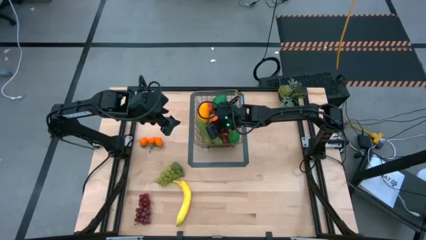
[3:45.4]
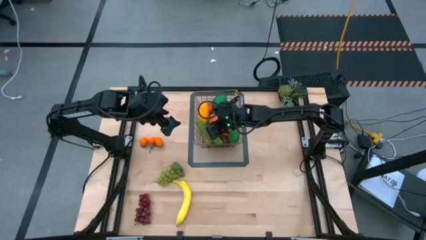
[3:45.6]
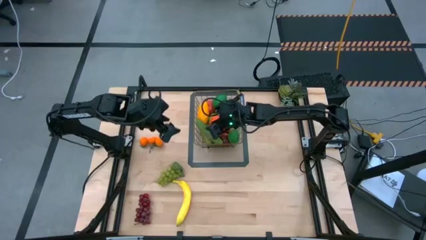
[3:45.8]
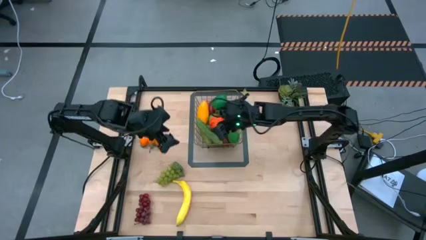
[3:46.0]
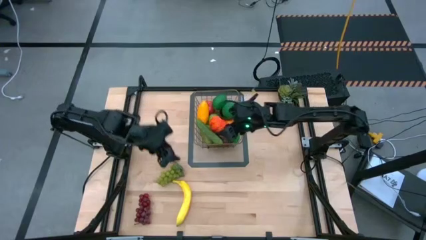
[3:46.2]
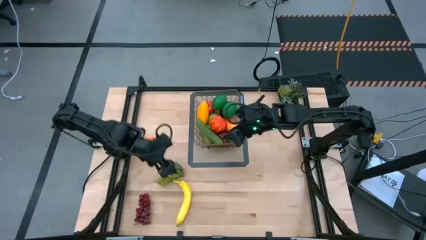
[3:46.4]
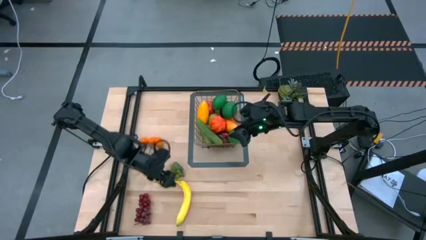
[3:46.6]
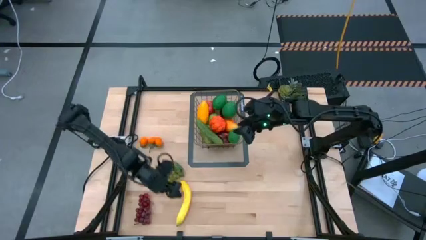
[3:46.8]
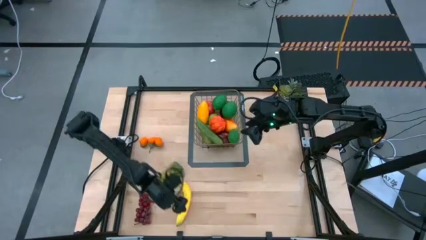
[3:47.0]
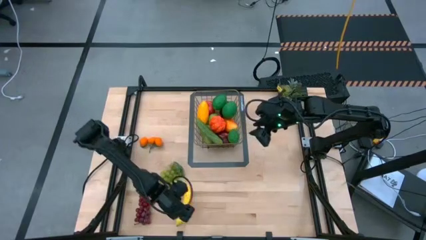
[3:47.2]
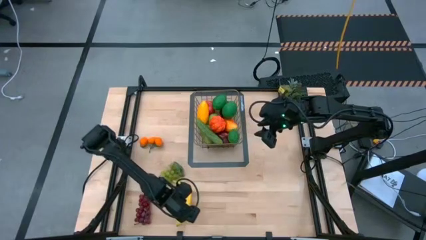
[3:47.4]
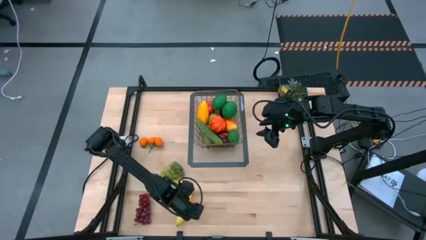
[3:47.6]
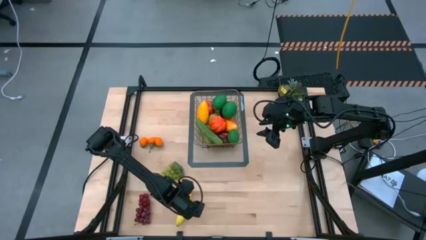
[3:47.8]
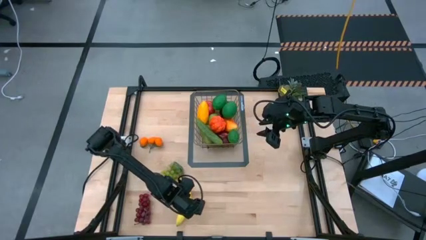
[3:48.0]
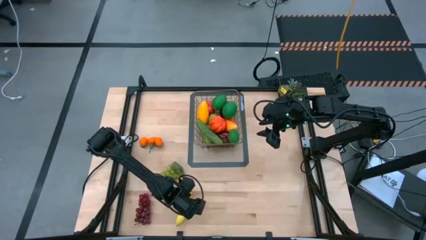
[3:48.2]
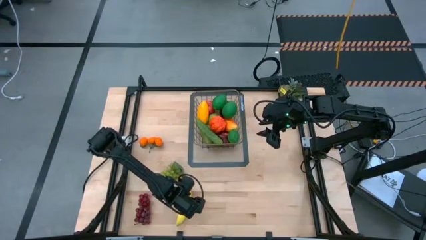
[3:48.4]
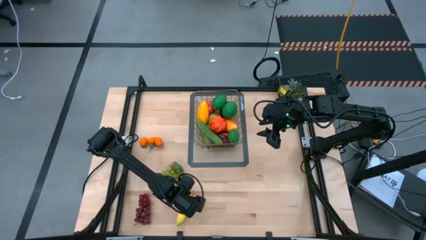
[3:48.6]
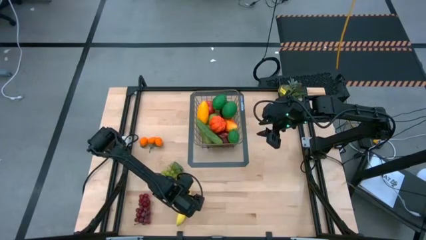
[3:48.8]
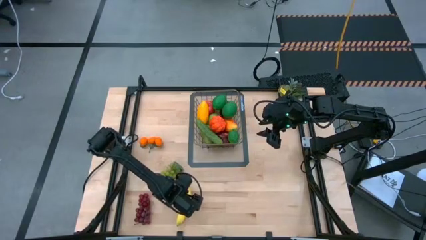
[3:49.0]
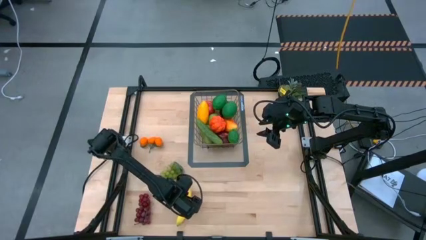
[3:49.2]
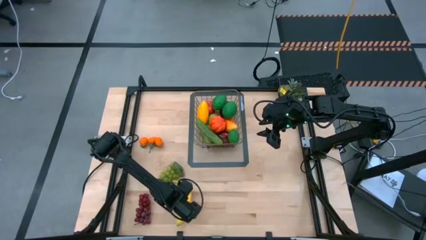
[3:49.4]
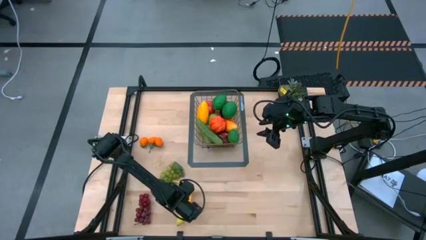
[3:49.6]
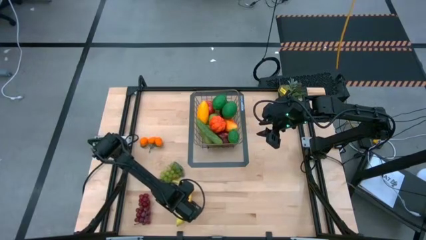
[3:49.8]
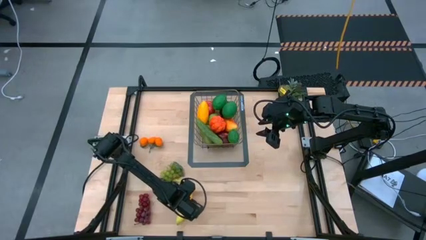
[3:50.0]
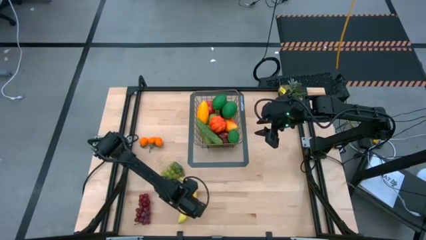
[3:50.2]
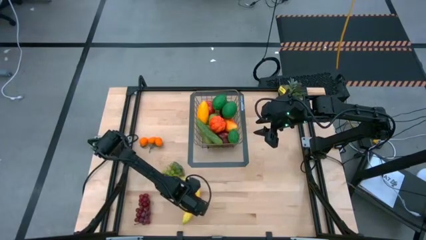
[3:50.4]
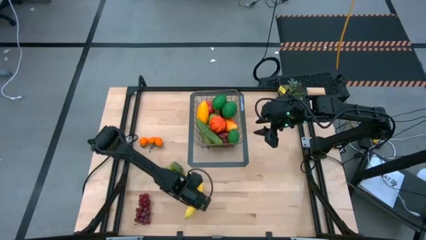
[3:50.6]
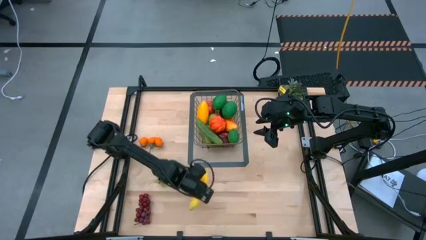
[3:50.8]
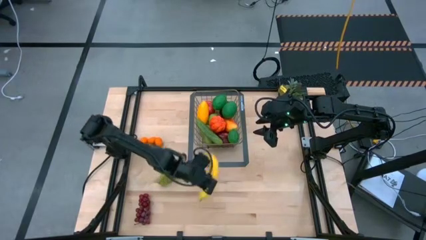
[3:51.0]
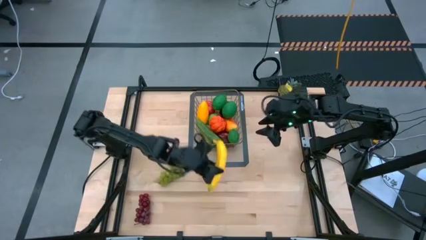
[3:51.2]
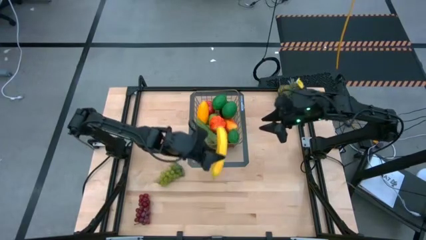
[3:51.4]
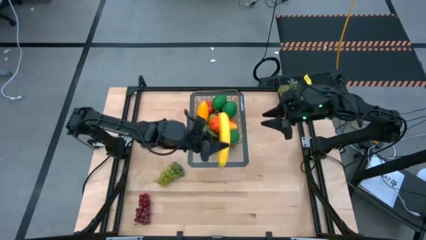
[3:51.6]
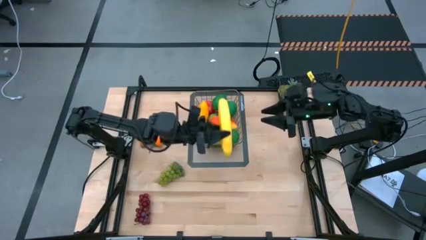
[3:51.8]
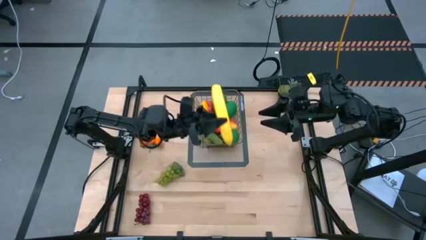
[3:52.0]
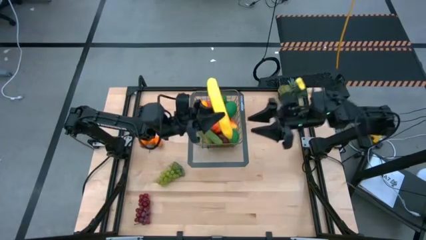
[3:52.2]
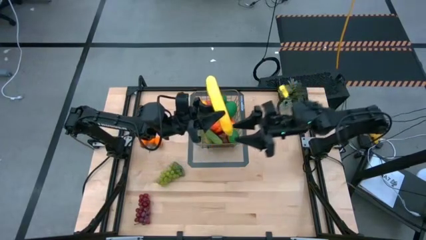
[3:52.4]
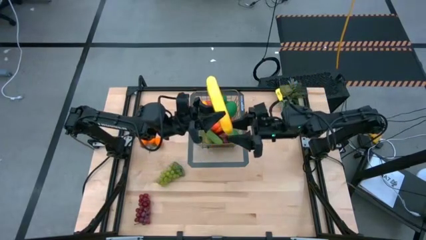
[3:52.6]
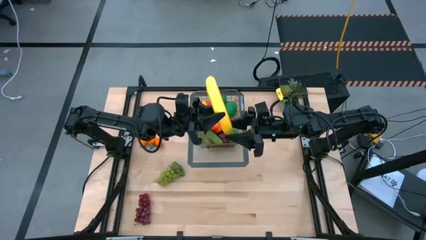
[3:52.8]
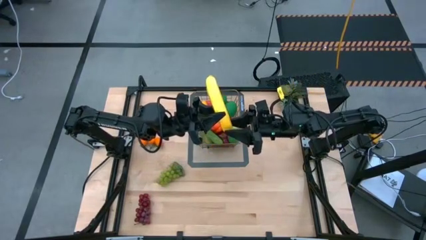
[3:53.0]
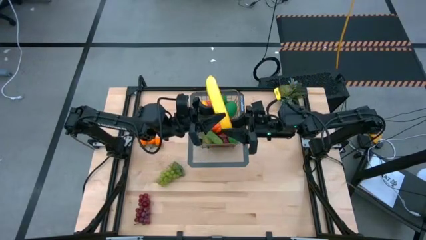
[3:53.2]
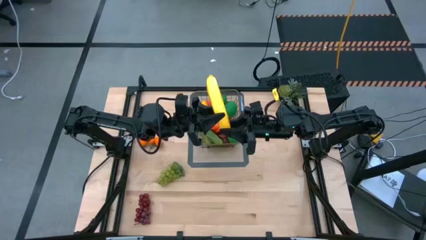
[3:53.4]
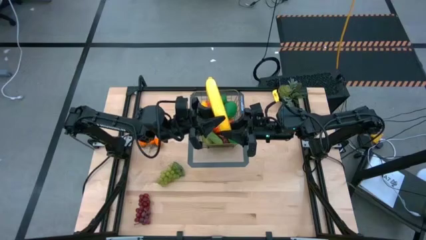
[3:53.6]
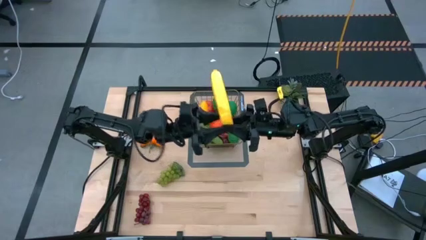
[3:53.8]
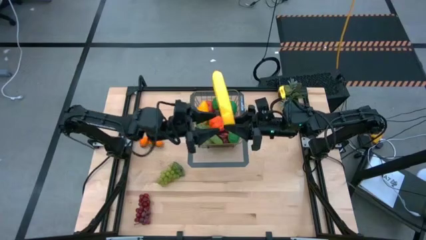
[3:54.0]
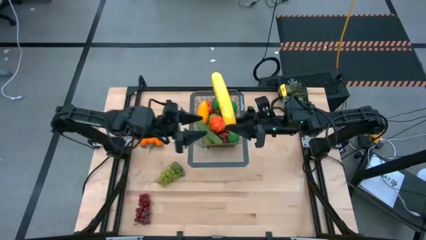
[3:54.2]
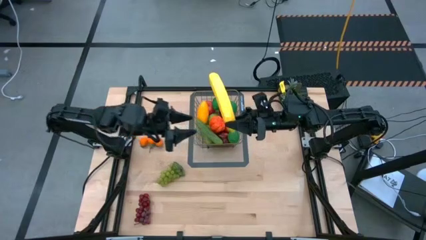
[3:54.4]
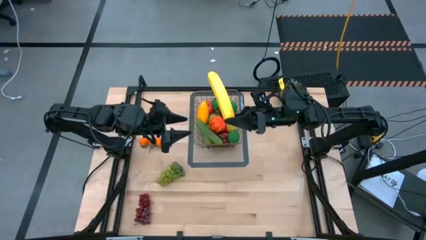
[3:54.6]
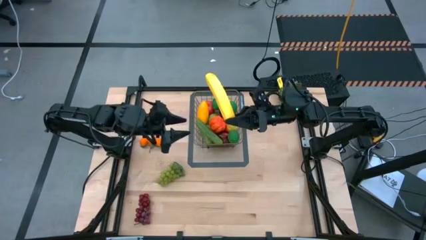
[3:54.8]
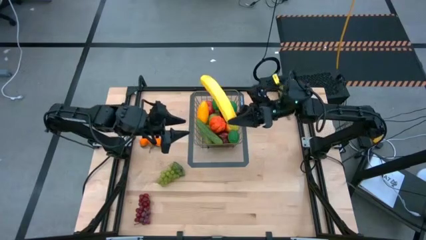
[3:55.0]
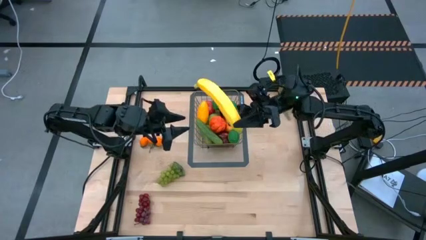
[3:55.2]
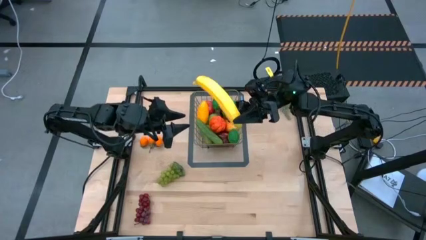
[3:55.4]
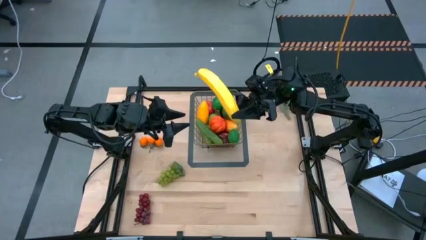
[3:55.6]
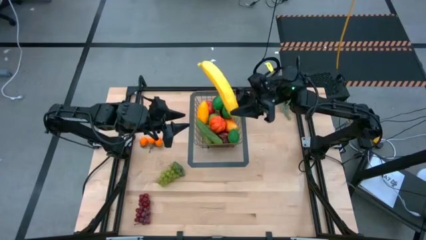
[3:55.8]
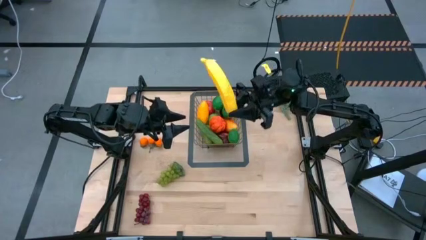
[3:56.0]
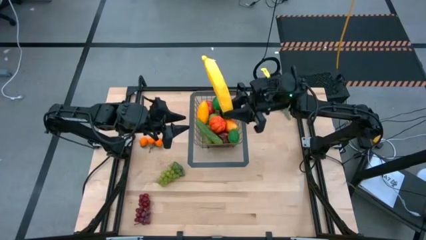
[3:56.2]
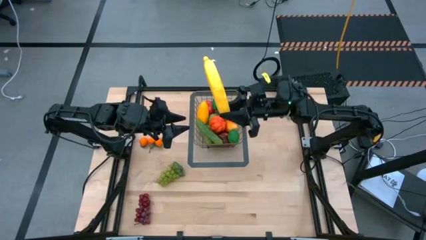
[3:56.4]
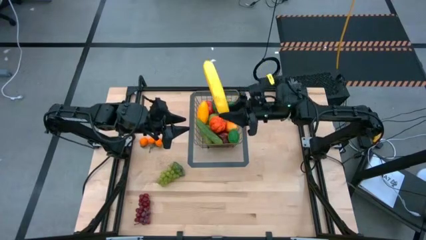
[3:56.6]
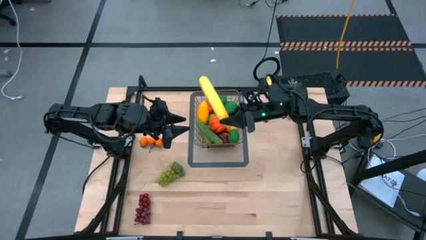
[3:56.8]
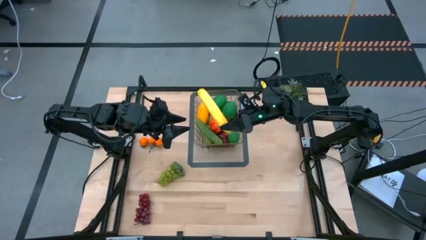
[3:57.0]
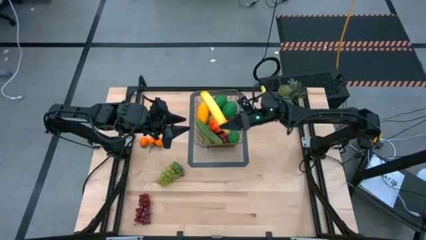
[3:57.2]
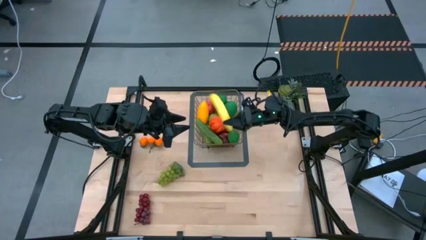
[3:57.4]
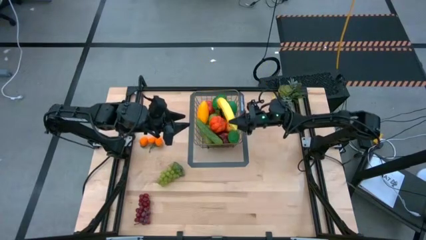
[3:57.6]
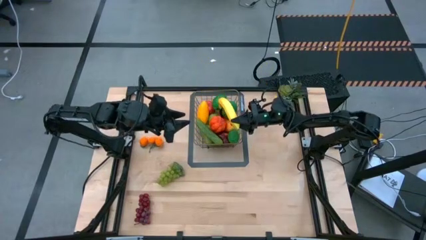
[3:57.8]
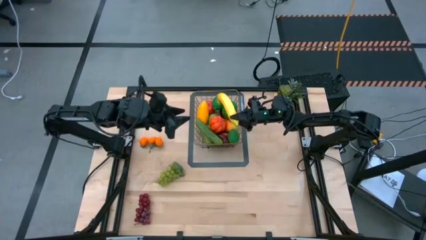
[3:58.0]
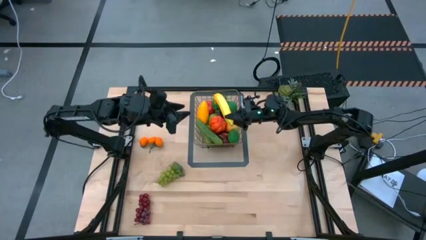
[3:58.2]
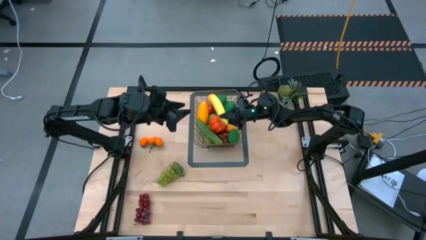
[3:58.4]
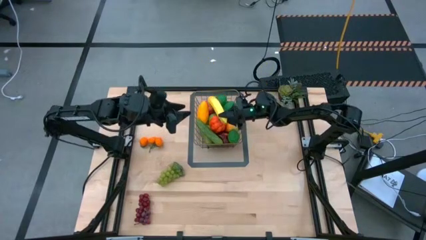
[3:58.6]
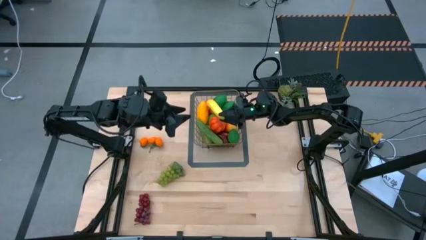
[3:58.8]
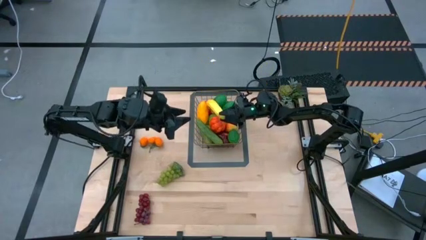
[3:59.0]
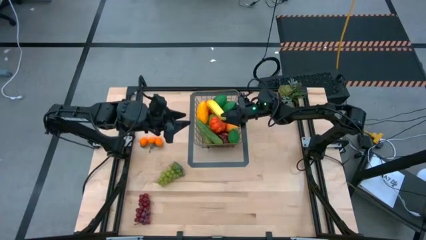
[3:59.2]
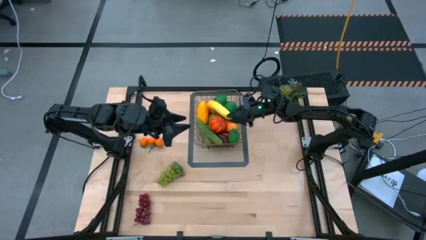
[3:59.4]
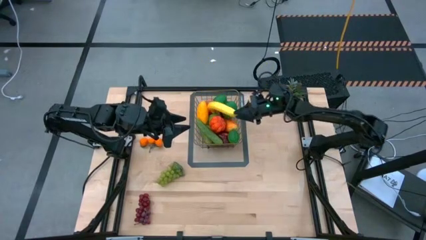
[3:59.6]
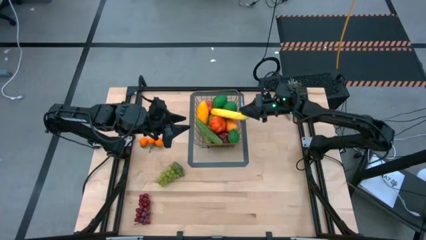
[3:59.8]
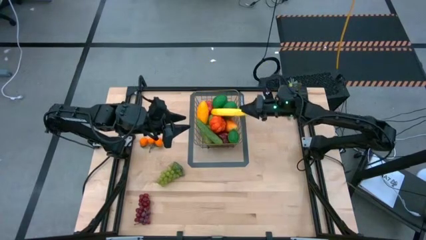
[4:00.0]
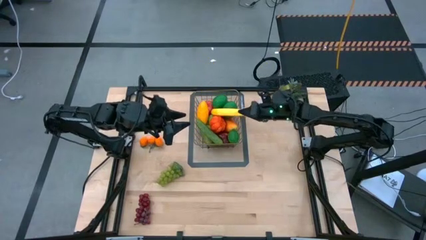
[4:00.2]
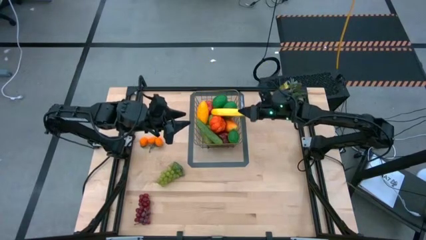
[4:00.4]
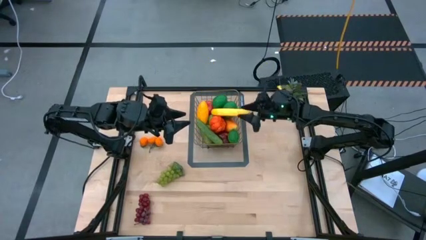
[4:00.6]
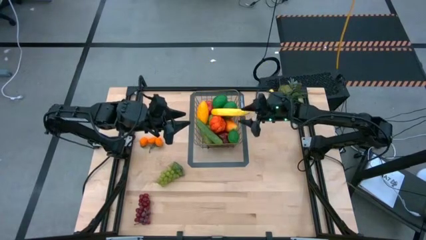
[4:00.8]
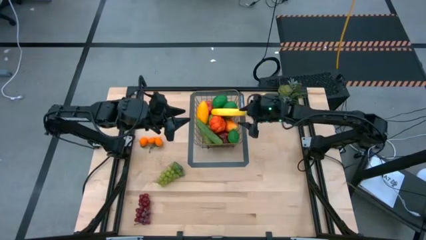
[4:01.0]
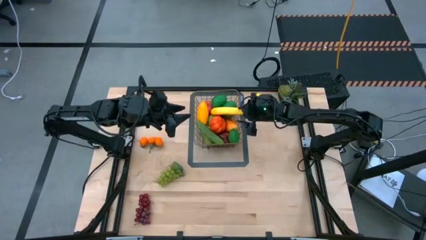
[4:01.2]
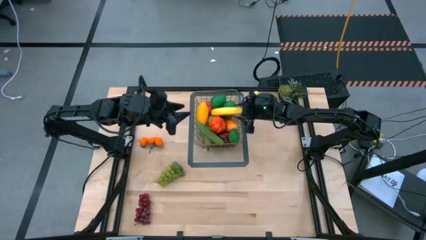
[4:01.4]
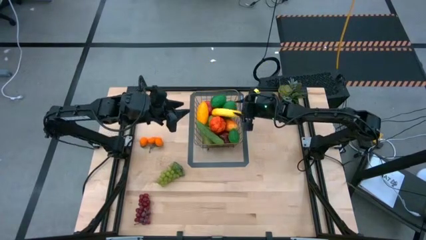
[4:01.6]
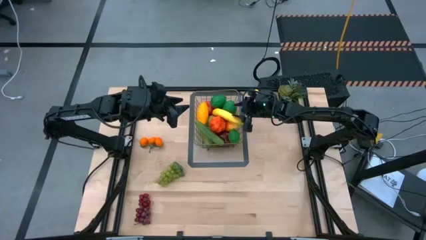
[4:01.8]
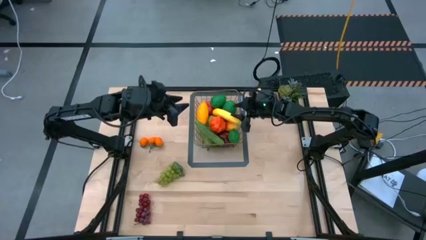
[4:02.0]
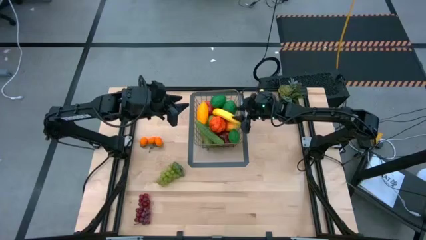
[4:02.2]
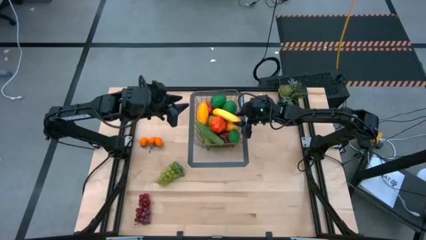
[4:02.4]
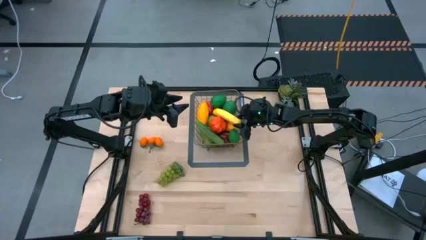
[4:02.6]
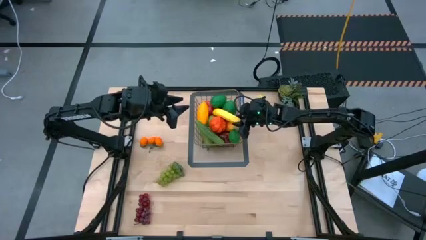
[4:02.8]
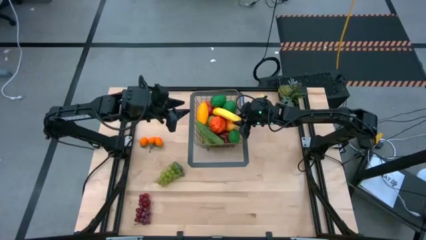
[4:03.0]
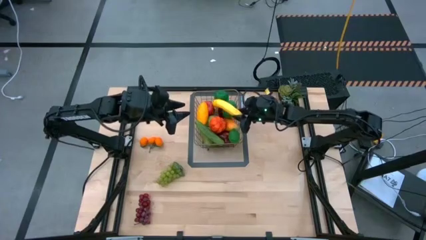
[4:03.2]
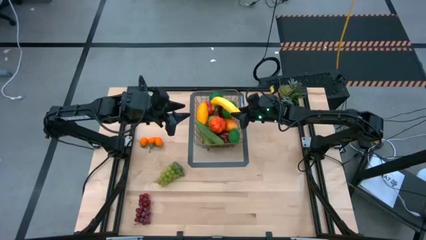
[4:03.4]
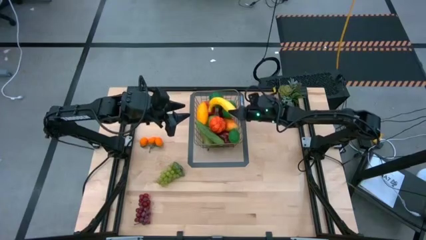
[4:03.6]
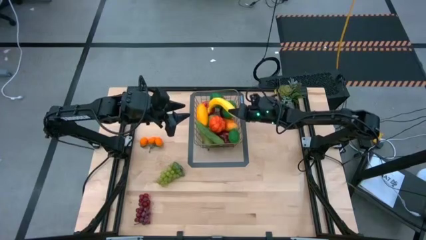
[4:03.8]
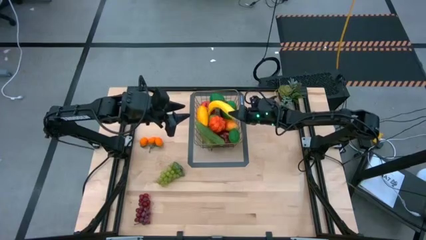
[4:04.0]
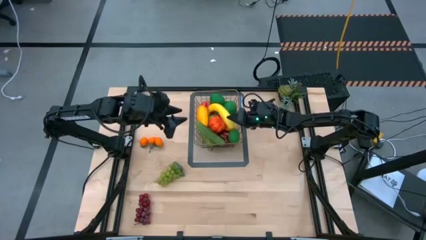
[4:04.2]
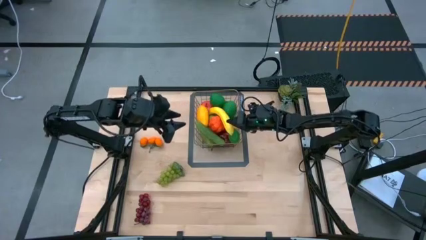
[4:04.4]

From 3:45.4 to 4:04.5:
Task: Build produce basket
Put the yellow banana into the gold wire basket
